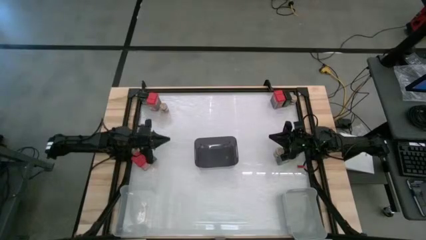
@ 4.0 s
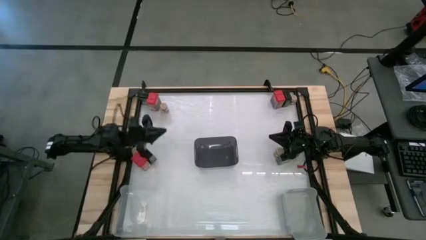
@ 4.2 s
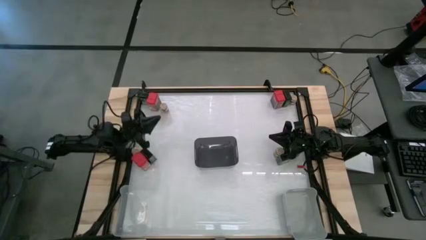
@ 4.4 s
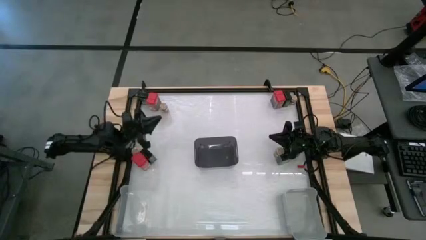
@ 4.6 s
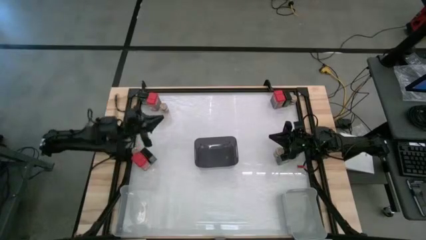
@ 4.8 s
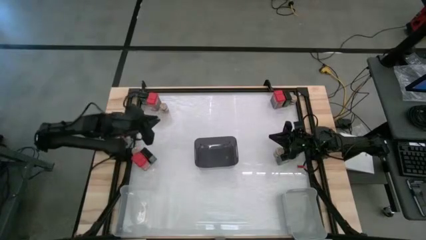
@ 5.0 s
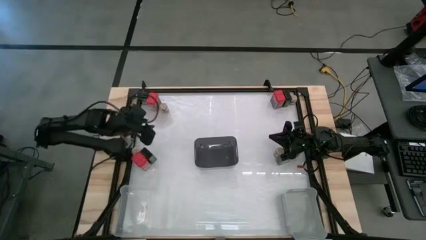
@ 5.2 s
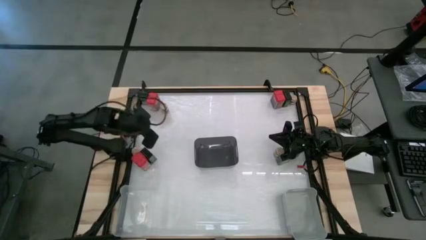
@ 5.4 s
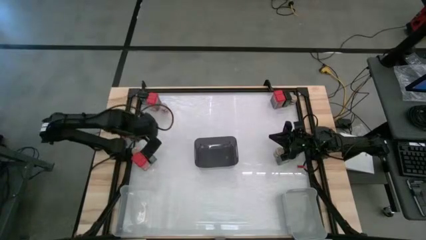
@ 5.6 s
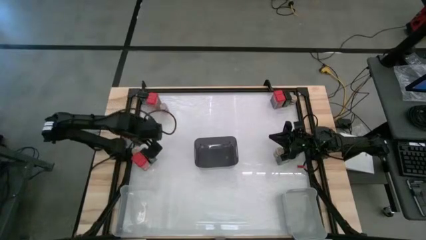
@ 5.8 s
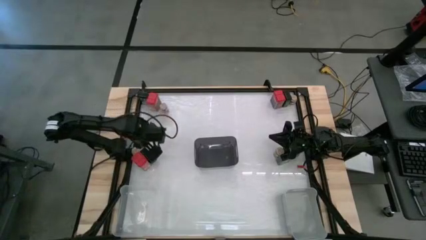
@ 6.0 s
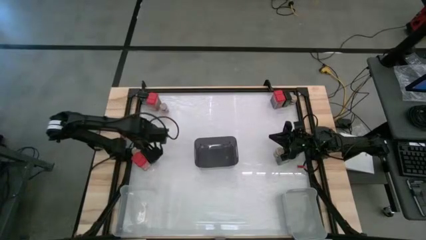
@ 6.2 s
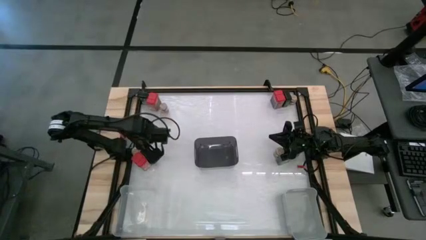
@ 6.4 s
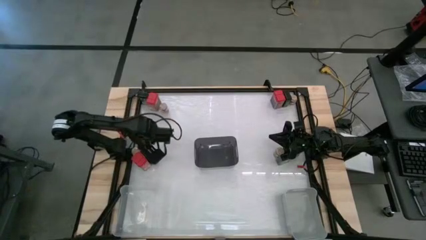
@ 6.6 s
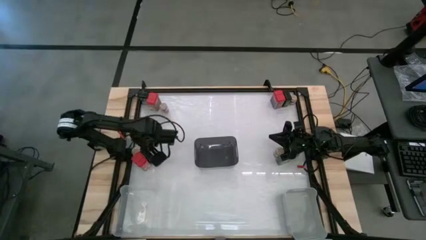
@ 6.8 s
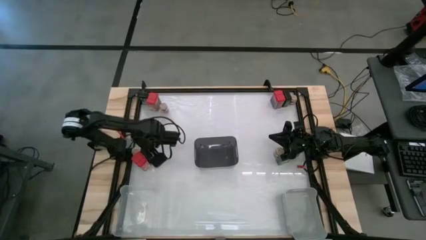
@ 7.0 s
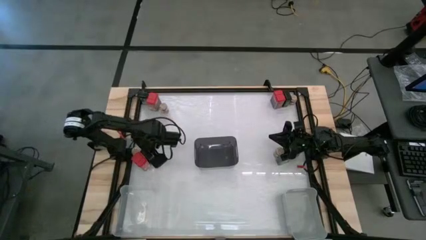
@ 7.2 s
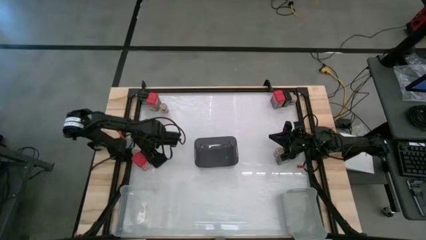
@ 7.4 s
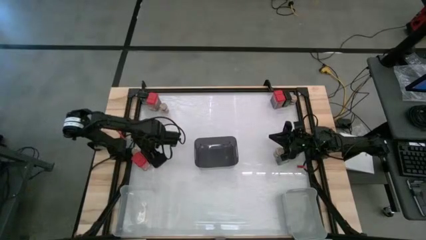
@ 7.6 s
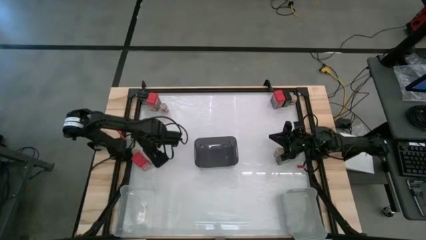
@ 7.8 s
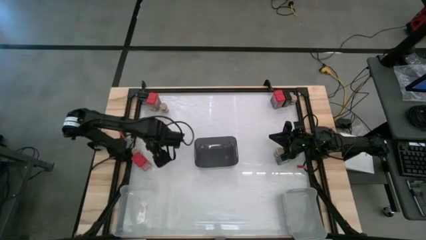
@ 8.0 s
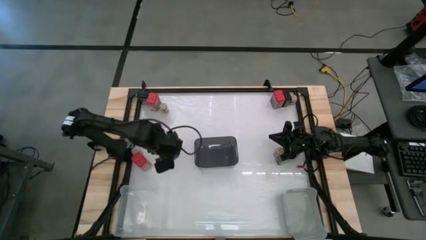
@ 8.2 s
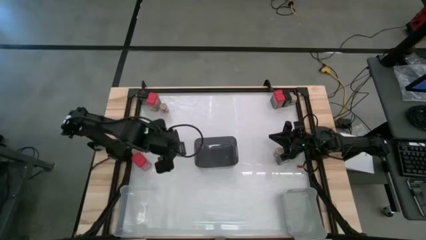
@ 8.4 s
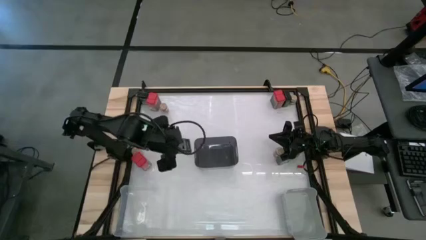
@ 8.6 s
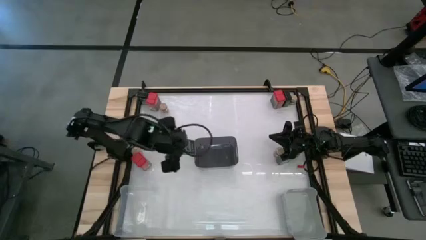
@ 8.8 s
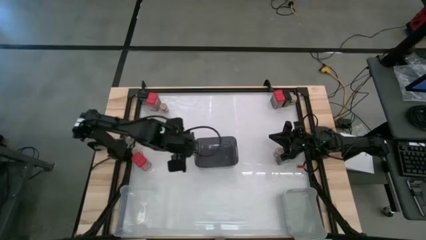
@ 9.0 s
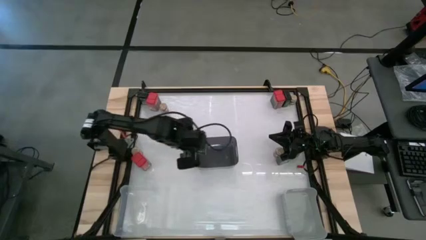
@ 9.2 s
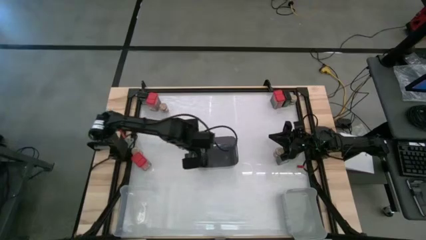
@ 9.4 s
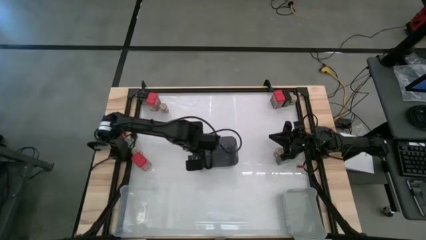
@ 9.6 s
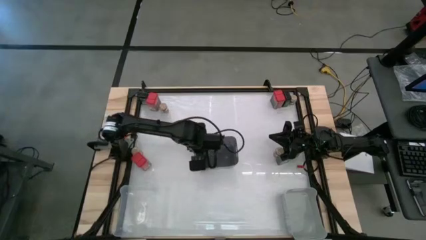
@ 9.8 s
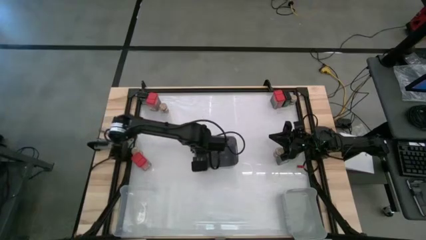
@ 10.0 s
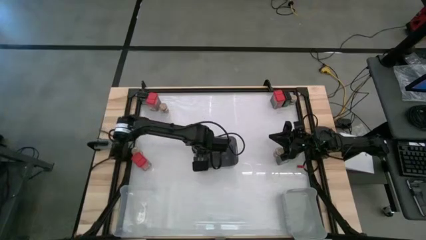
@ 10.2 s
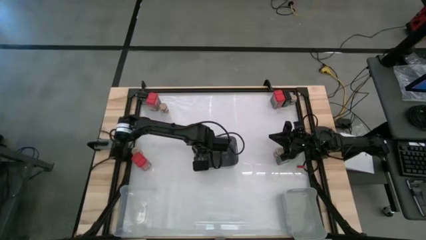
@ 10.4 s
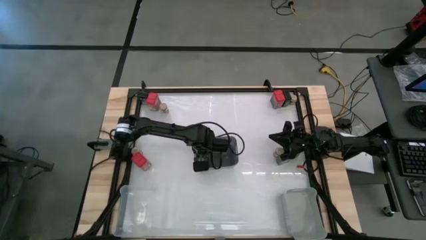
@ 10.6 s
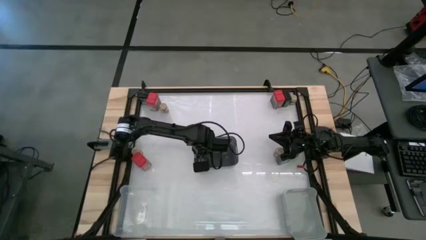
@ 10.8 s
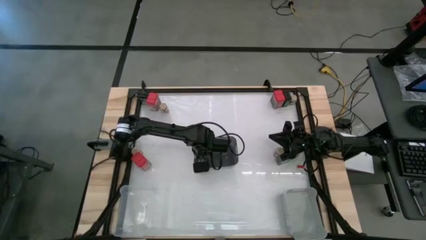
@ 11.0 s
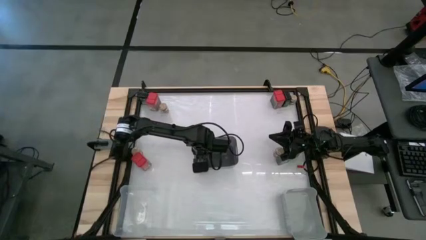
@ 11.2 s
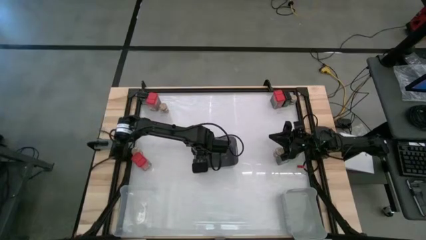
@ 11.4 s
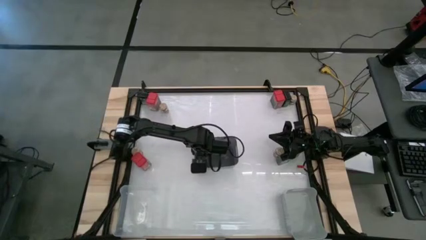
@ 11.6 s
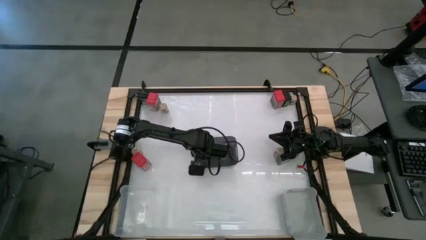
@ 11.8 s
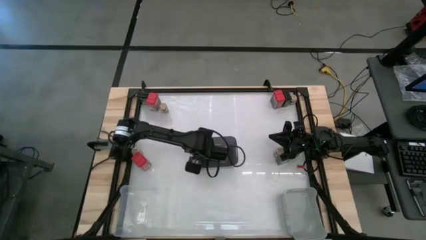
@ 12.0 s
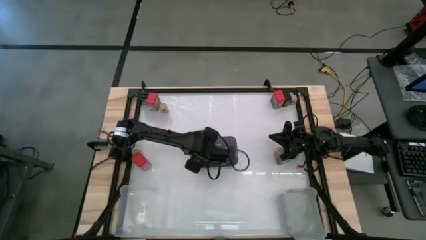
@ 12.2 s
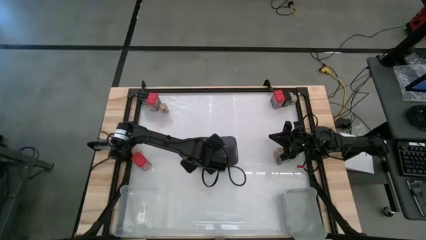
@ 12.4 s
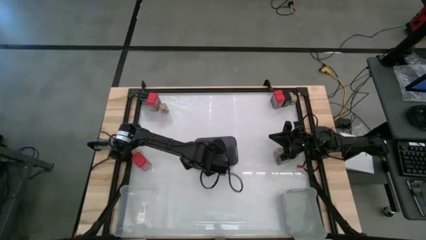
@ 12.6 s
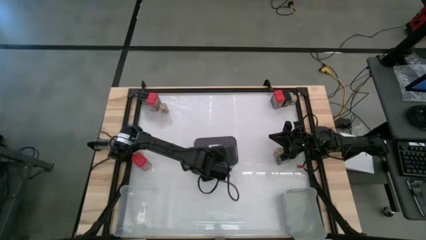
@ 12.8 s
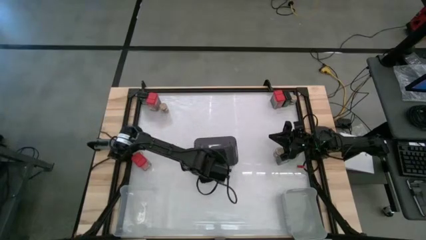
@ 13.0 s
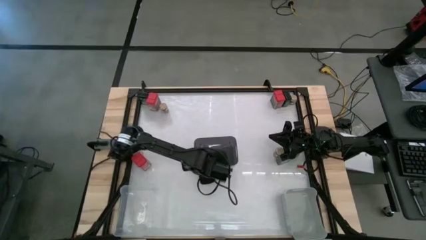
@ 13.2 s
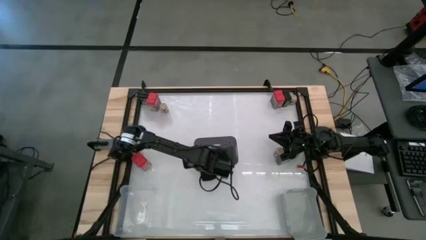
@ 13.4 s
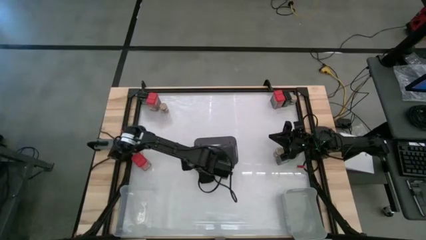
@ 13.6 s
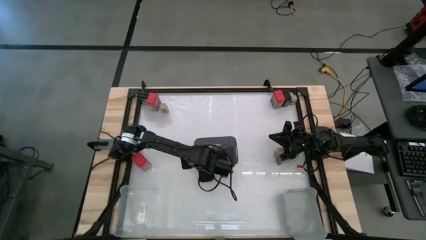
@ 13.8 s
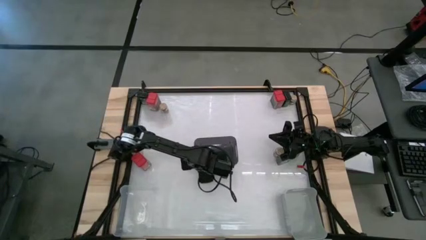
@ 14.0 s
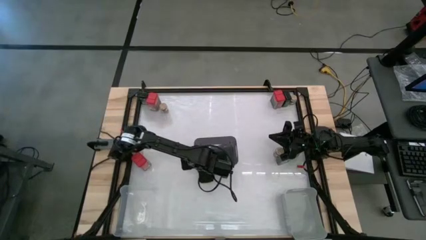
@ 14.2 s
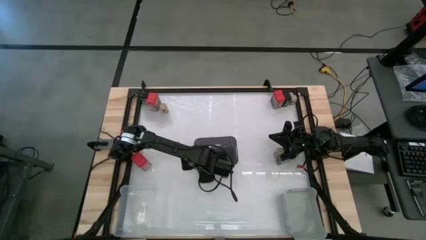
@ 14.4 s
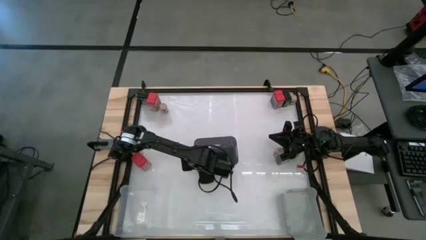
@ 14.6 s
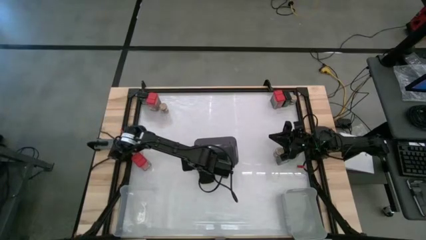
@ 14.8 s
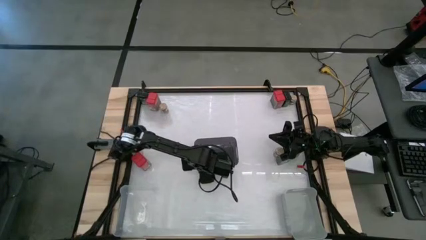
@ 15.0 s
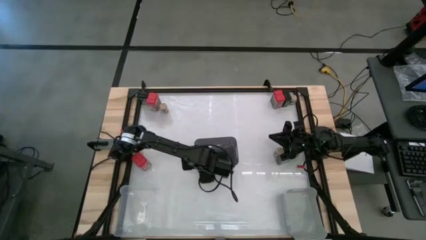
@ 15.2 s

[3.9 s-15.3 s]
Task: Sort spices by type
Put the black seasoning can into the black bin
